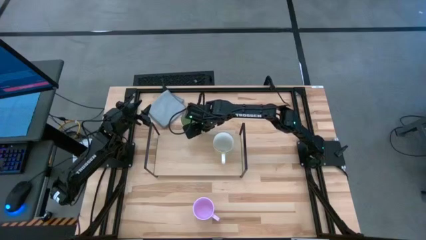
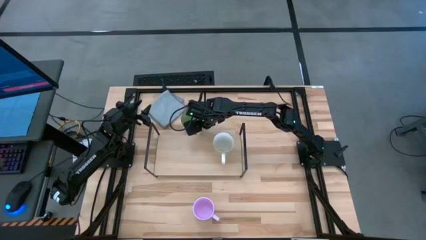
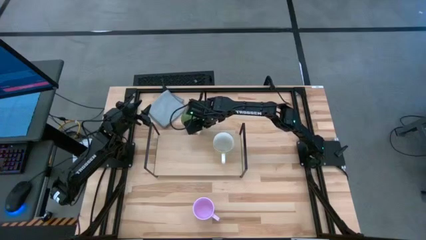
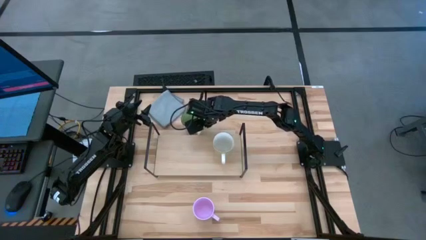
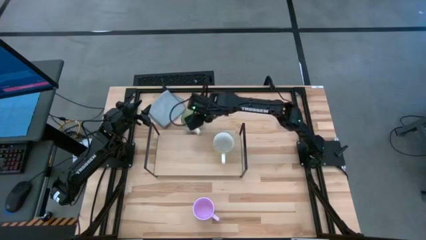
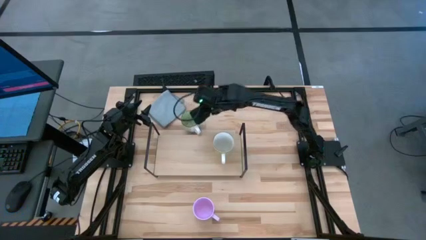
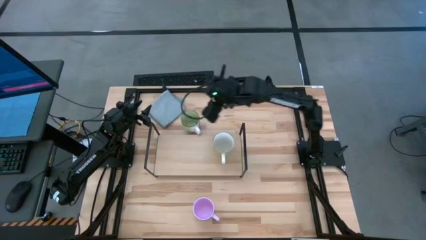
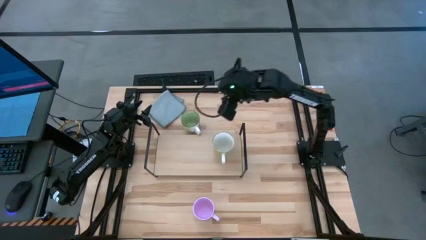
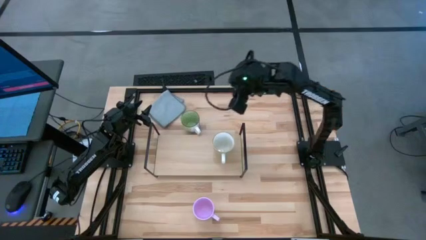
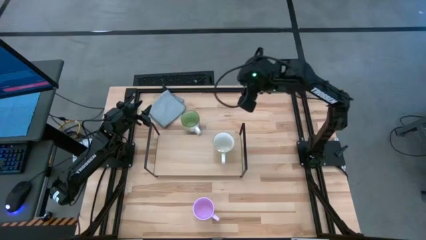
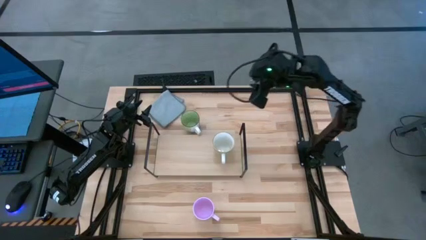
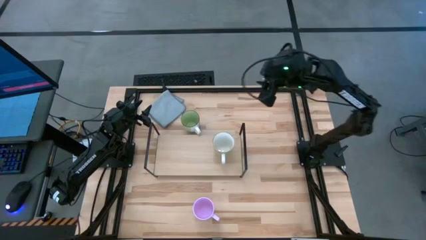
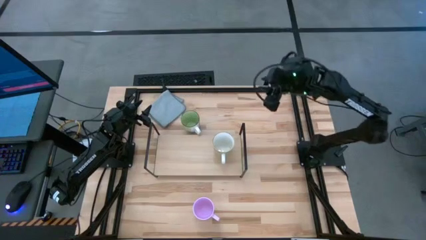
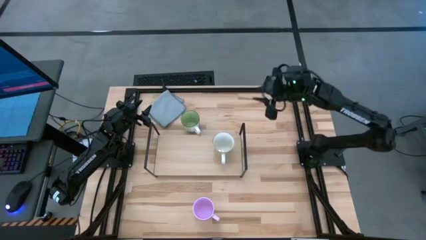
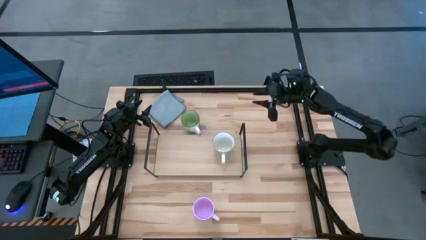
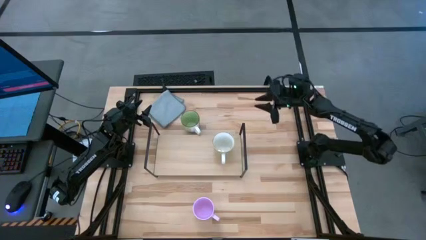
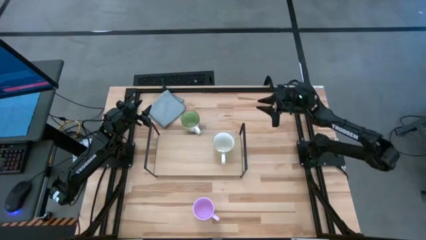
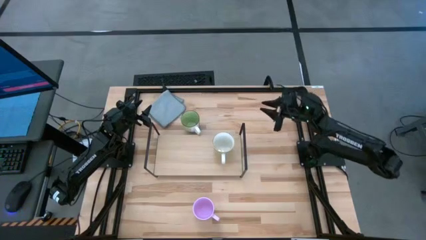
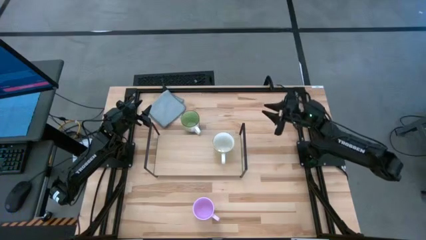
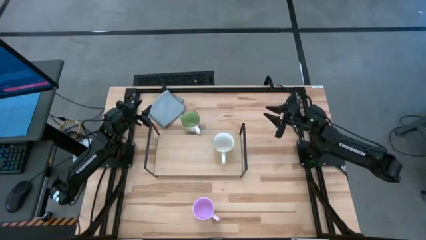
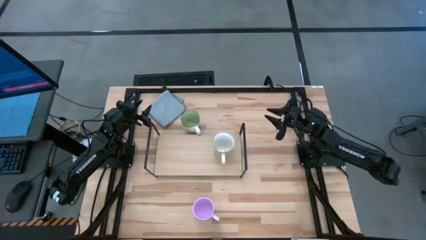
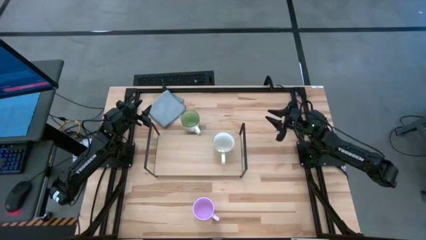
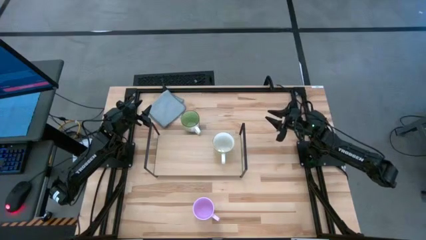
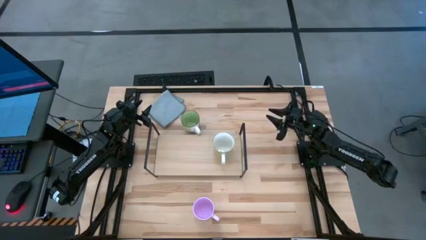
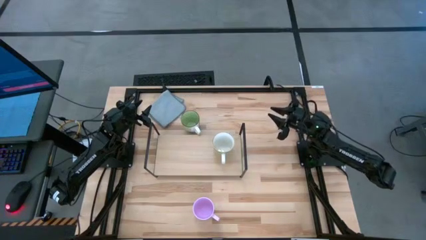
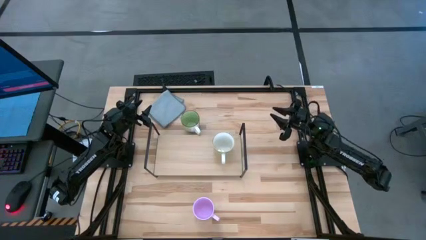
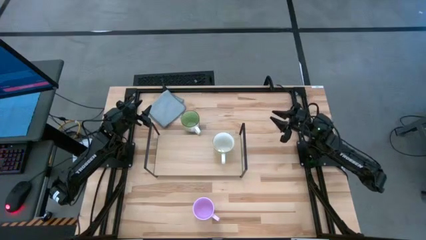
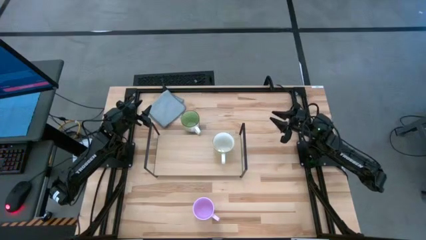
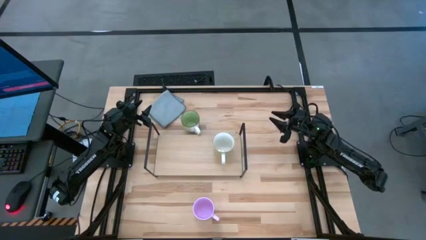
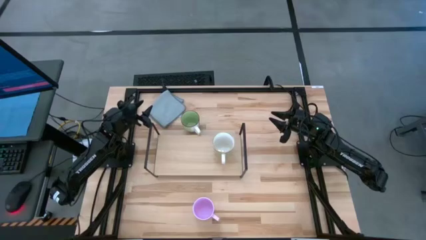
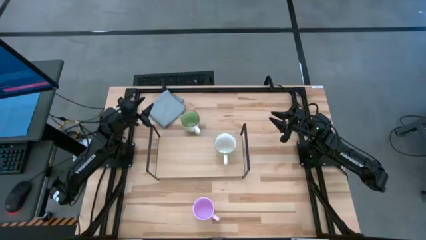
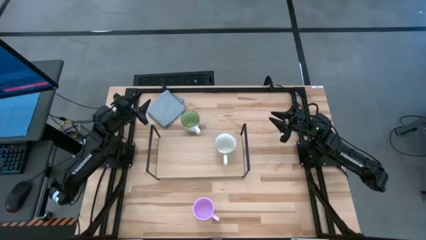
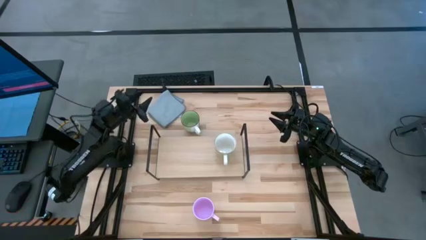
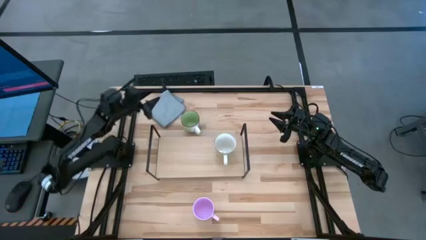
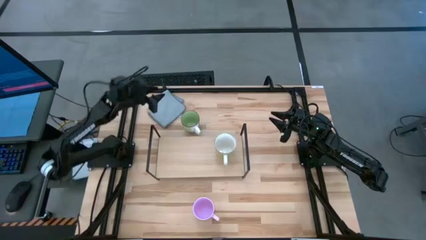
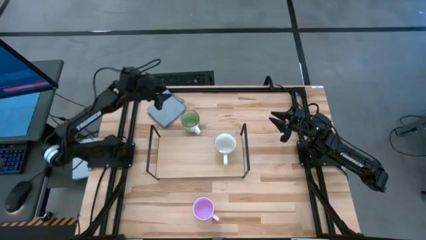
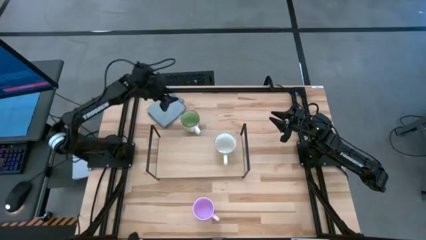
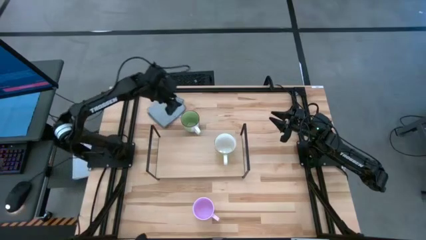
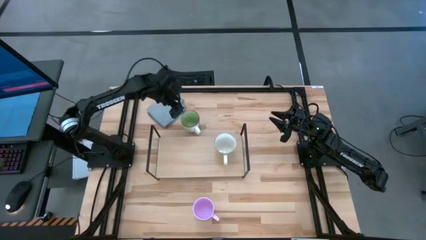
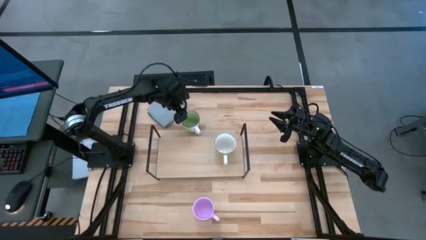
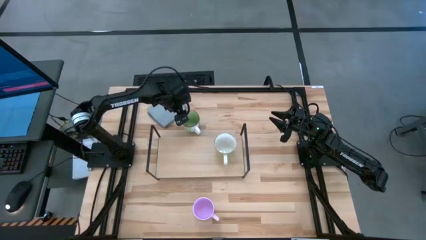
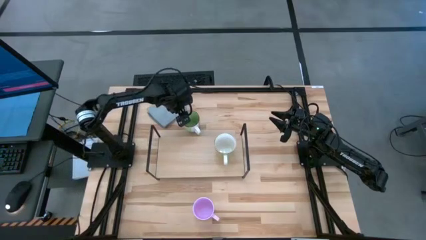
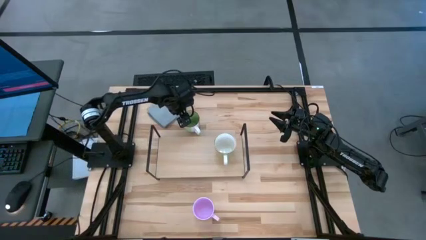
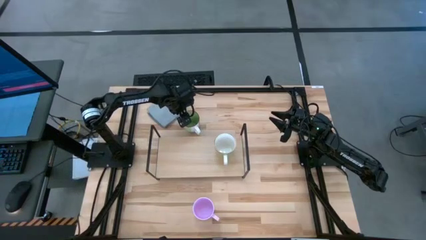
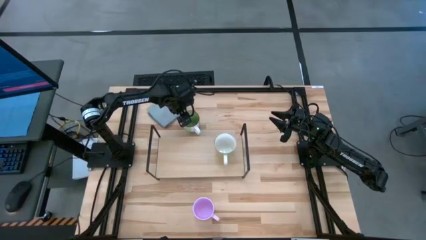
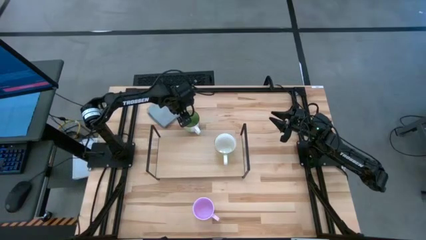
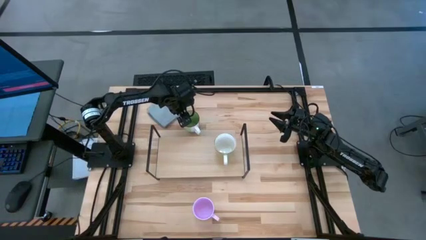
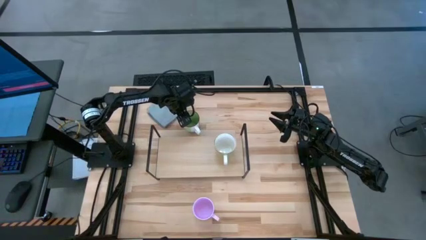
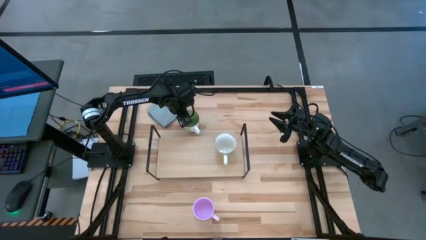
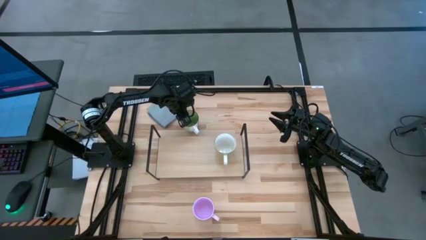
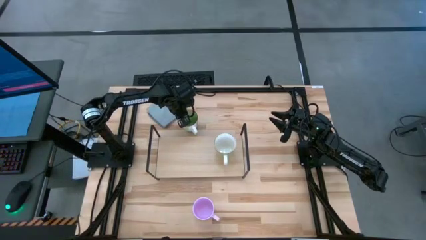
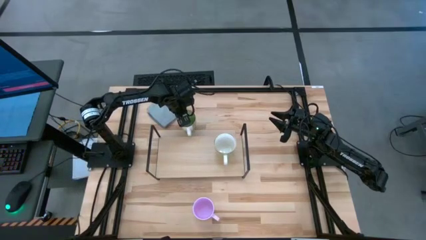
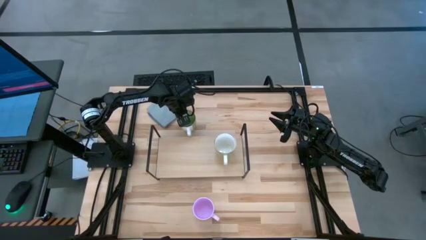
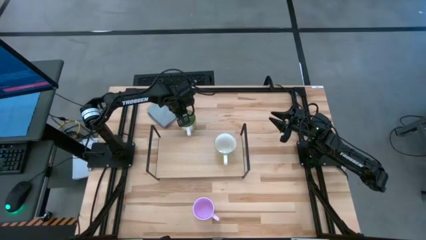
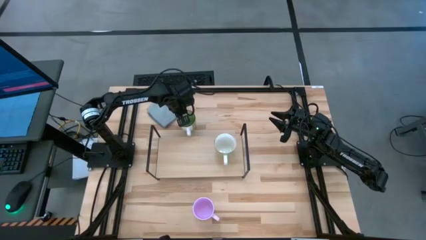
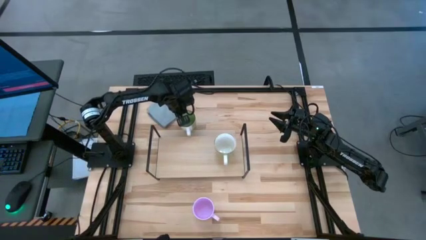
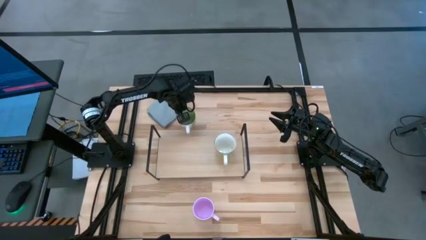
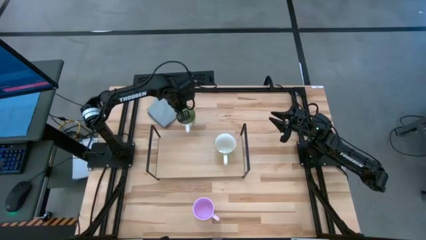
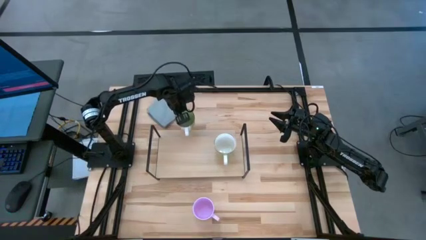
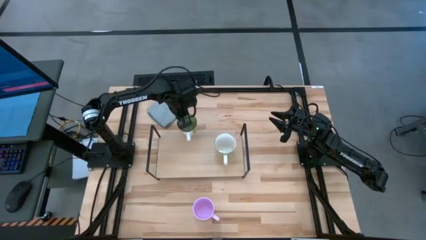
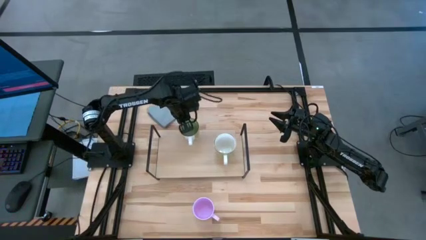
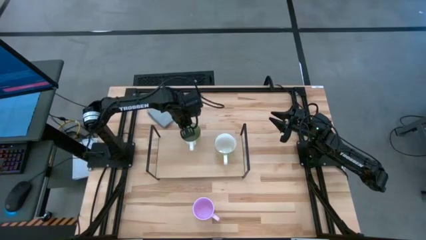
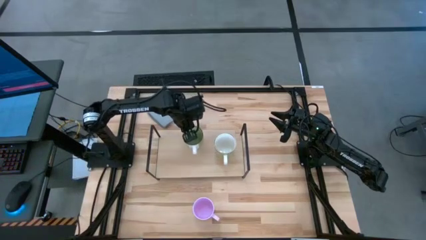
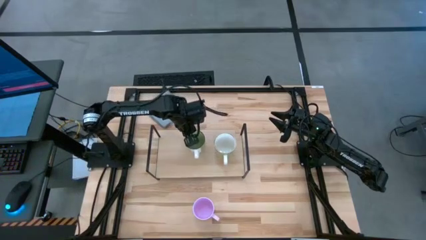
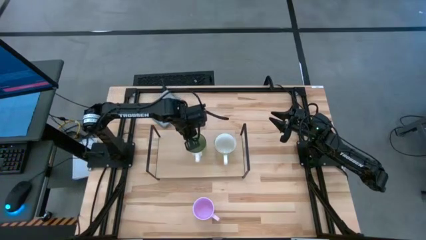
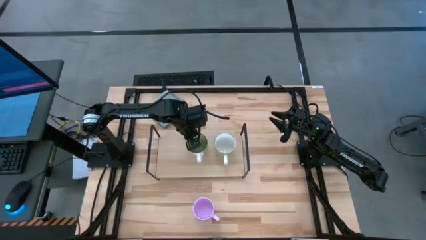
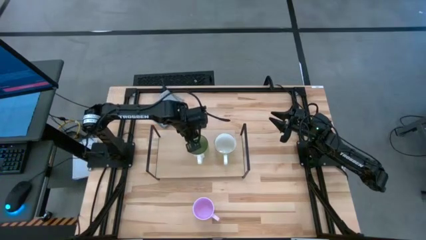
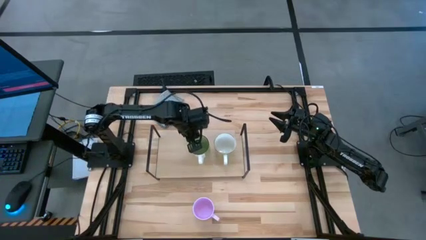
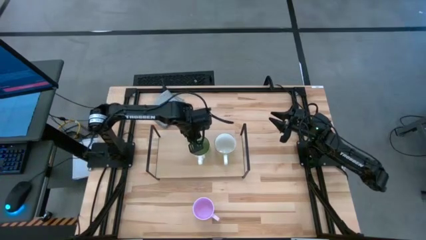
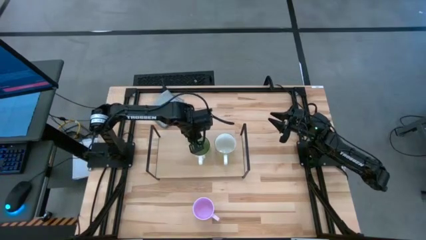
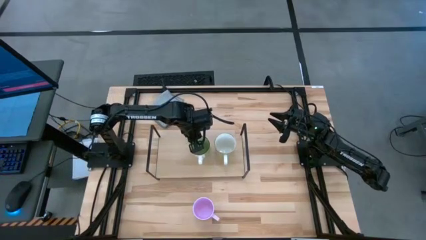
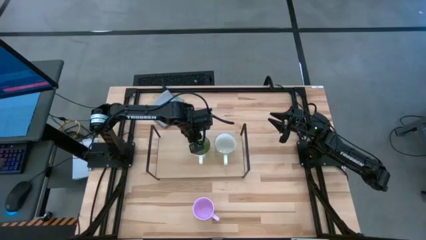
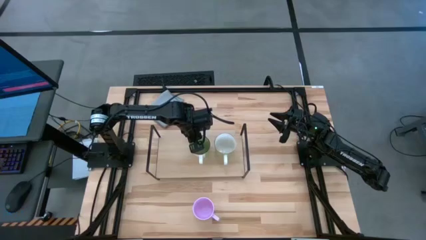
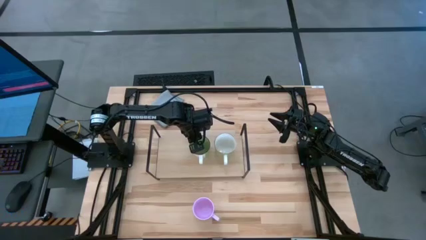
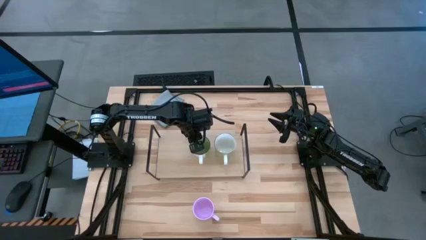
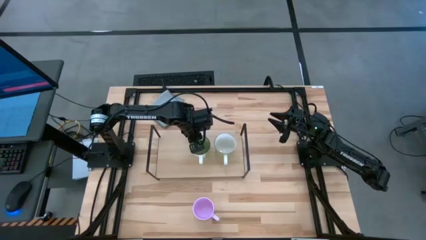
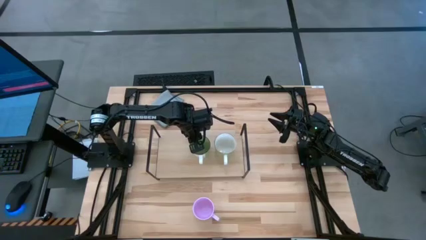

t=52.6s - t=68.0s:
Task: Stack small to large cups/mugs on shelf
Put the green mug on the shelf
